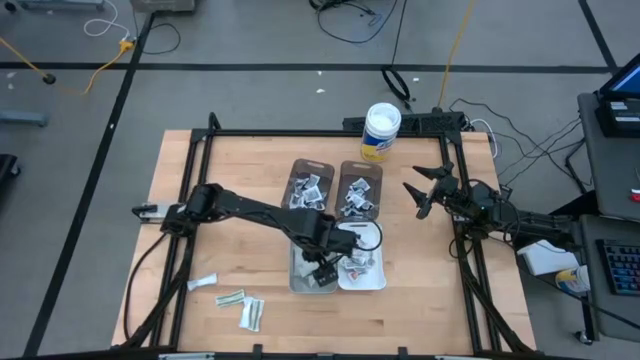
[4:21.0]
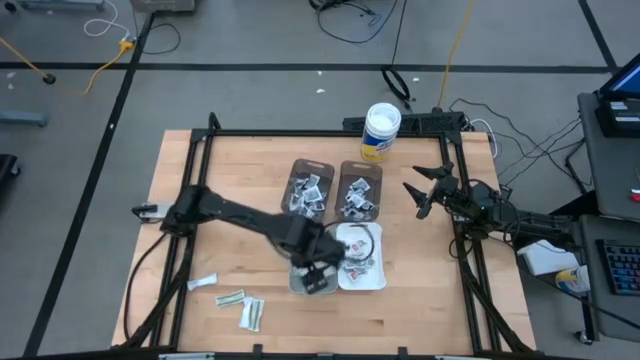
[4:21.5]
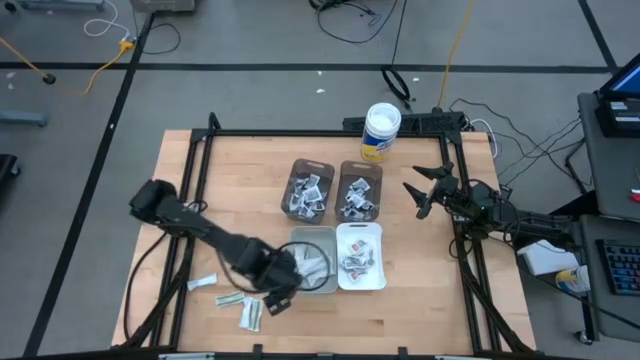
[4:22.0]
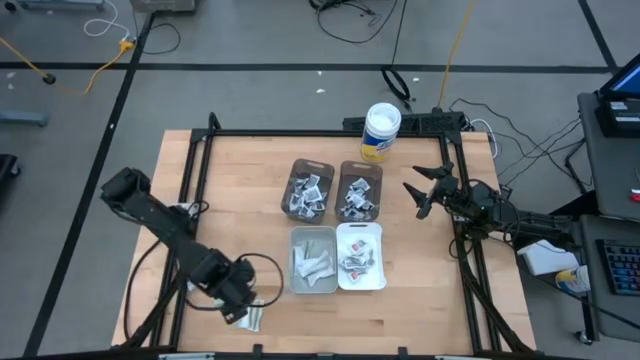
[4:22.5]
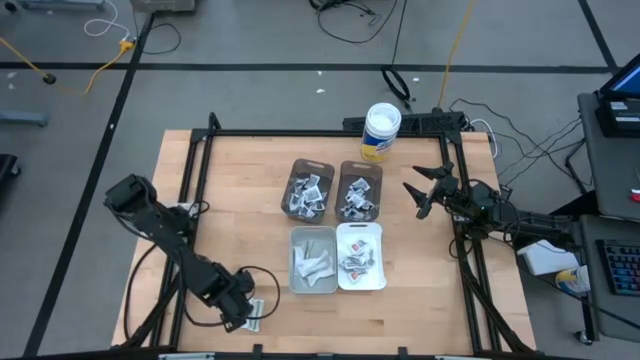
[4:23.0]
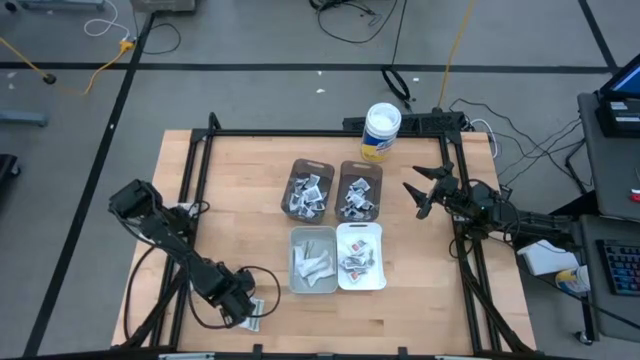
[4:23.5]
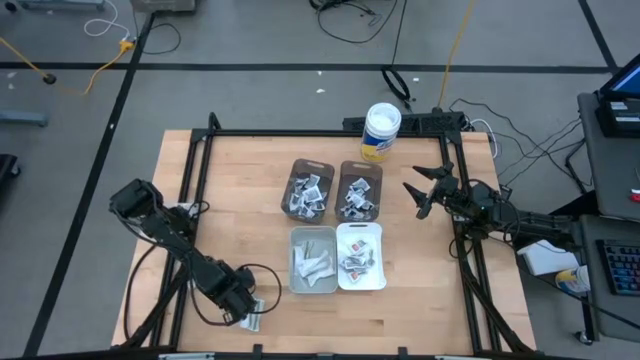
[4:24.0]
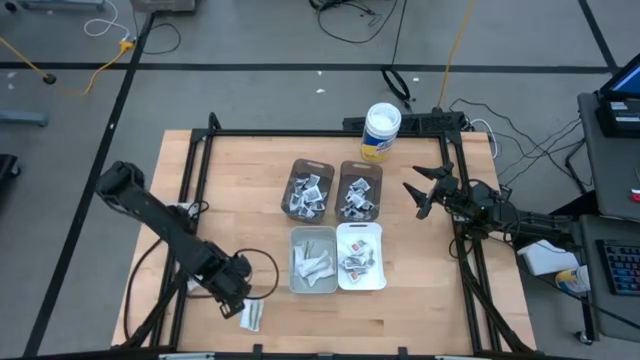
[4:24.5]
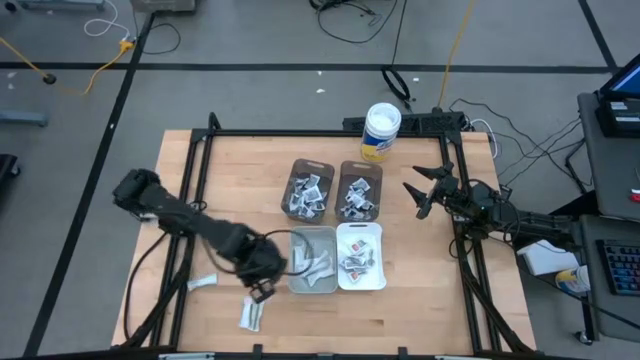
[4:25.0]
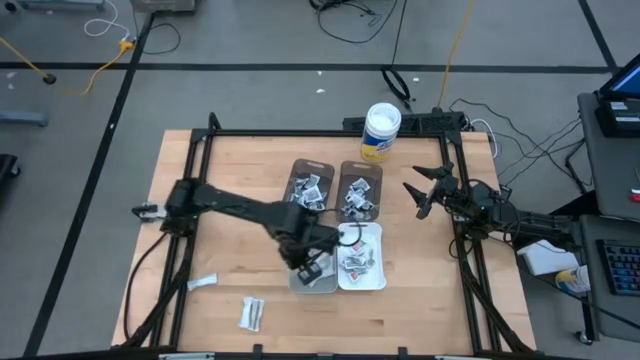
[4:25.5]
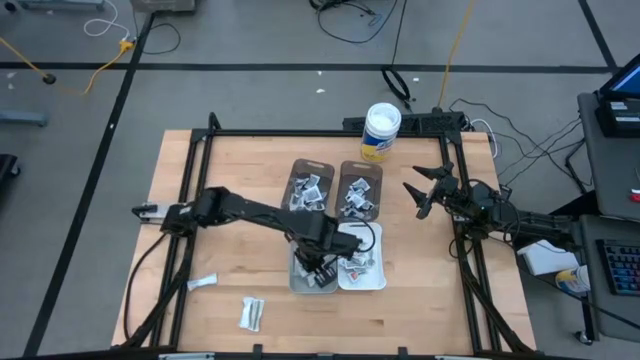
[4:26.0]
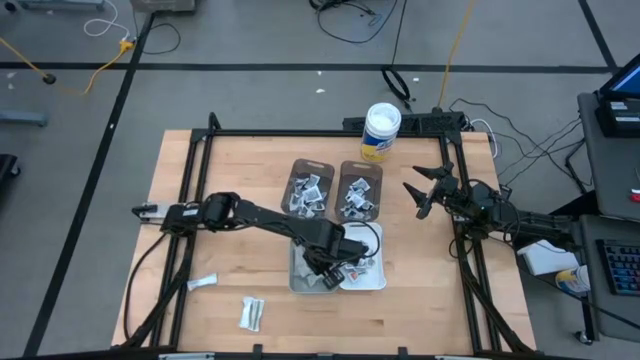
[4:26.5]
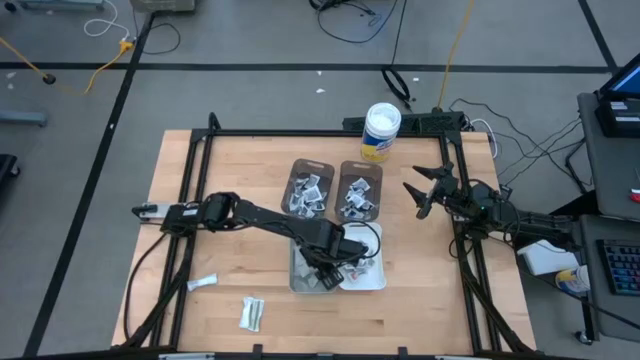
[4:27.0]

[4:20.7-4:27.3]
Task: Pick & Place First Aid Supplies
Put the green pad into the gray bin

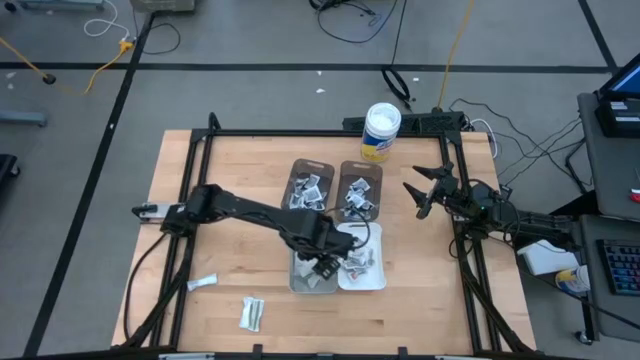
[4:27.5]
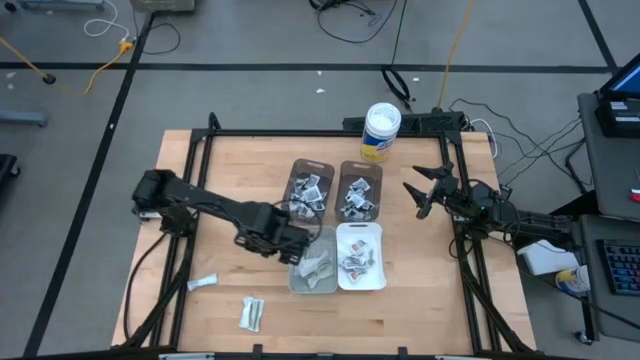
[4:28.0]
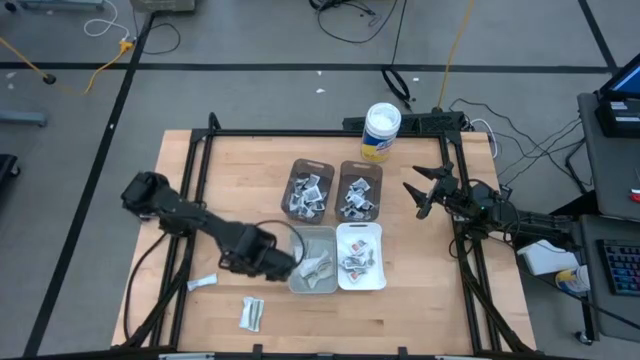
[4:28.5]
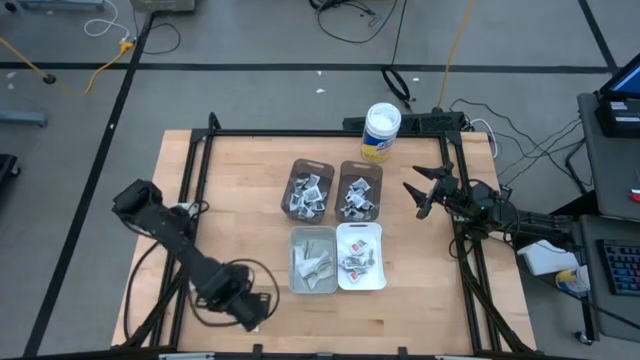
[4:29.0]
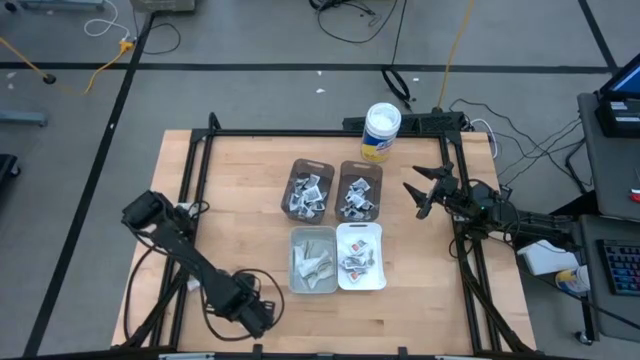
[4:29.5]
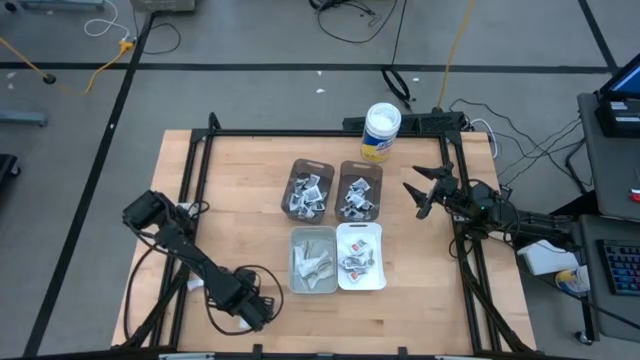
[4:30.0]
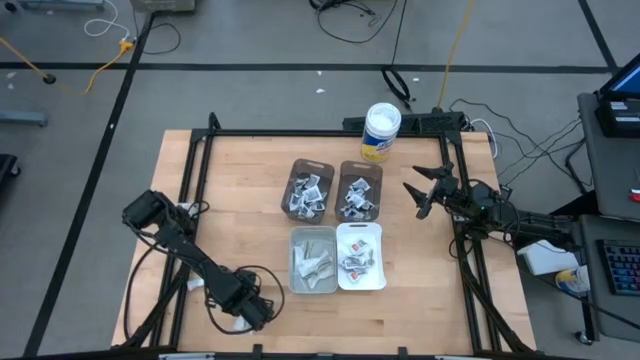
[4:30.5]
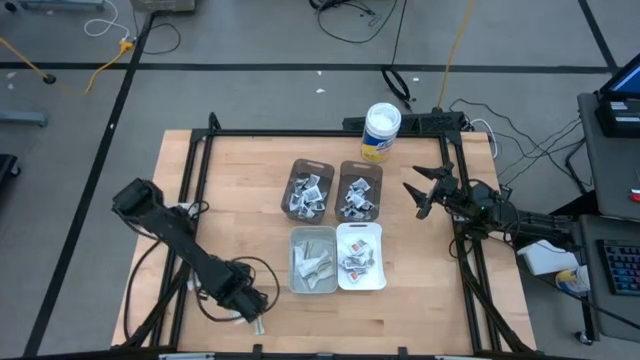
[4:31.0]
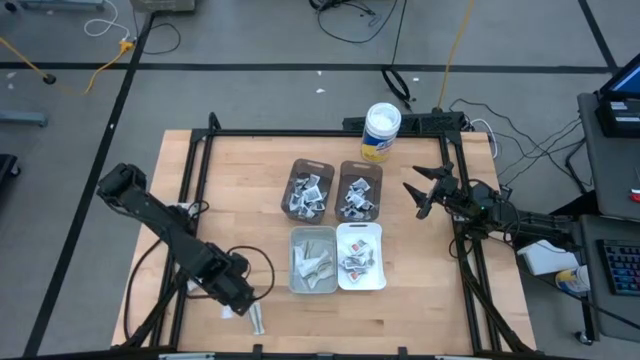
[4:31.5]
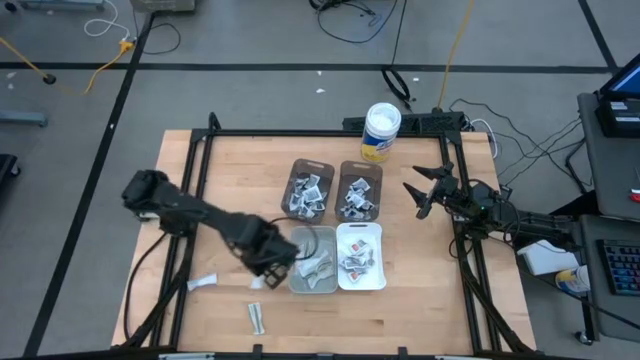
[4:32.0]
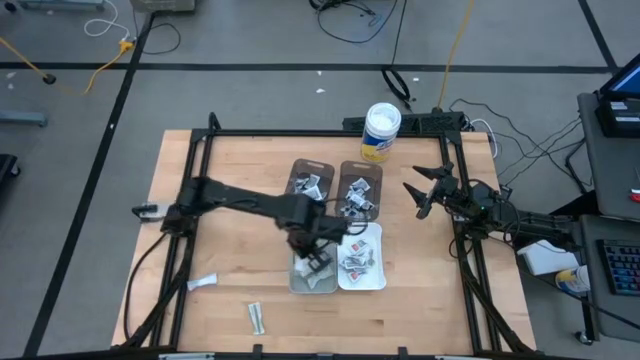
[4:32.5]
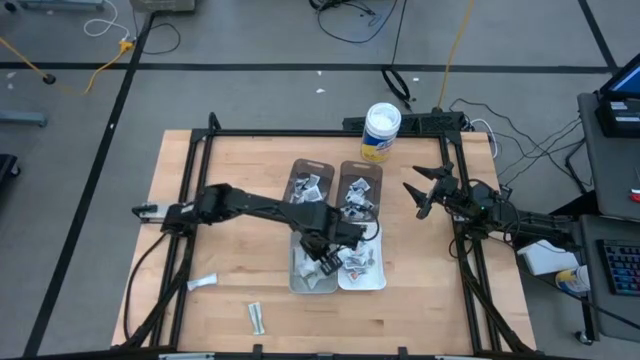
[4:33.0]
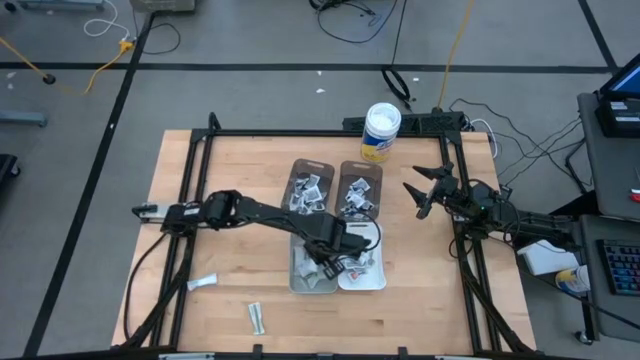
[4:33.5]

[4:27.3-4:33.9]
Put the green pad into the gray bin

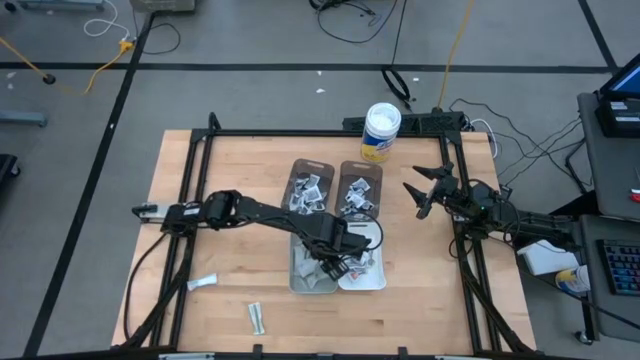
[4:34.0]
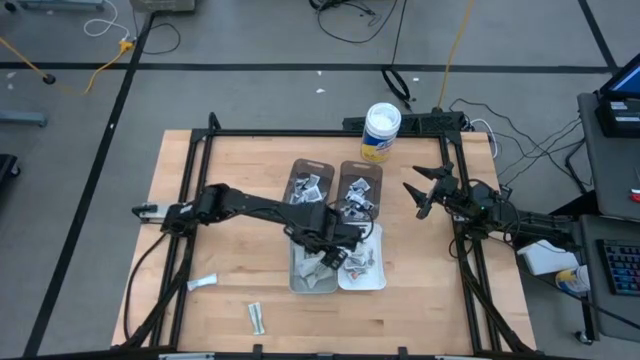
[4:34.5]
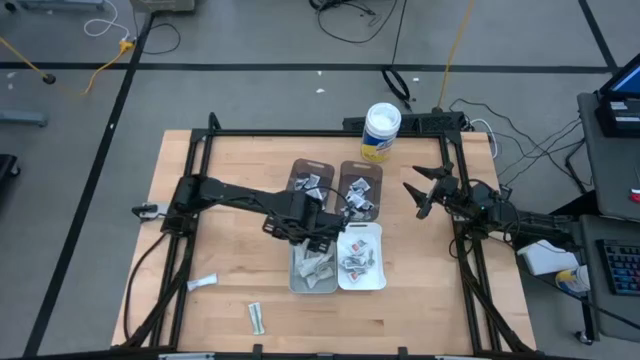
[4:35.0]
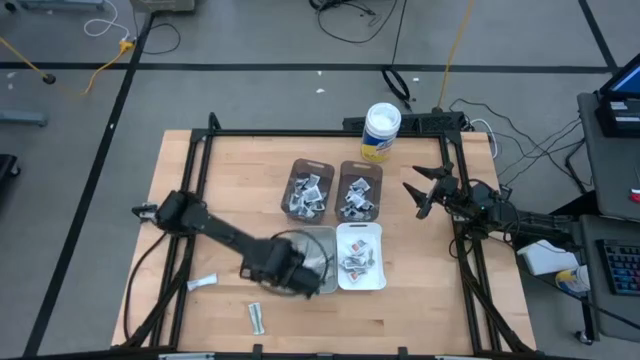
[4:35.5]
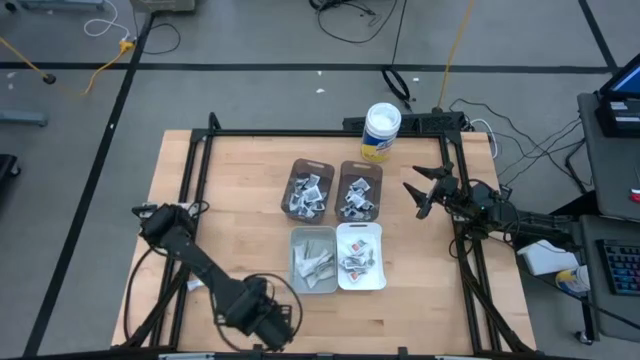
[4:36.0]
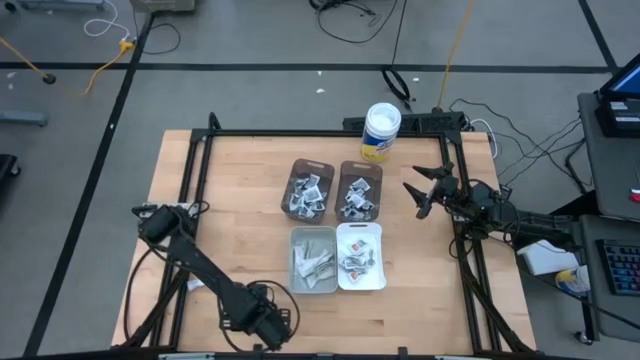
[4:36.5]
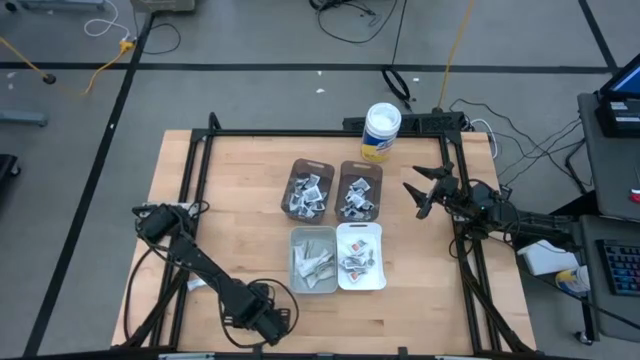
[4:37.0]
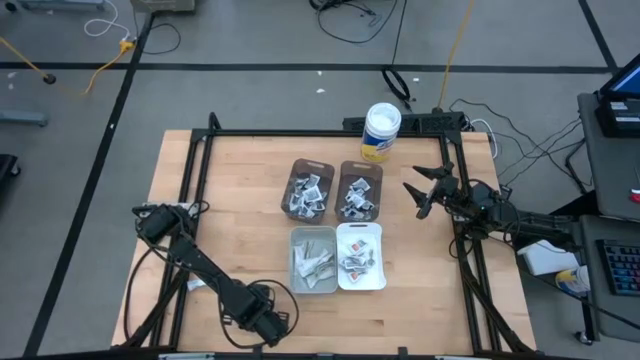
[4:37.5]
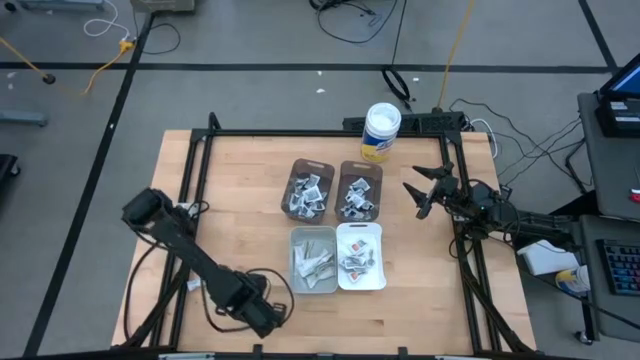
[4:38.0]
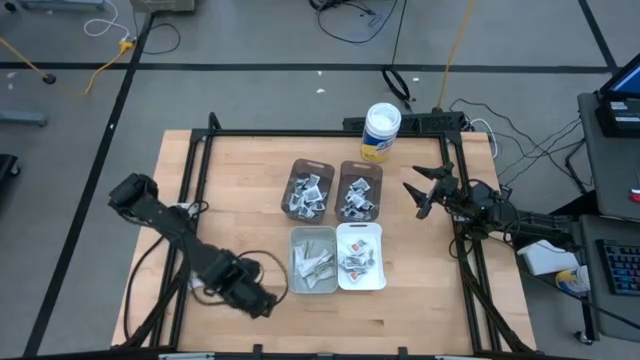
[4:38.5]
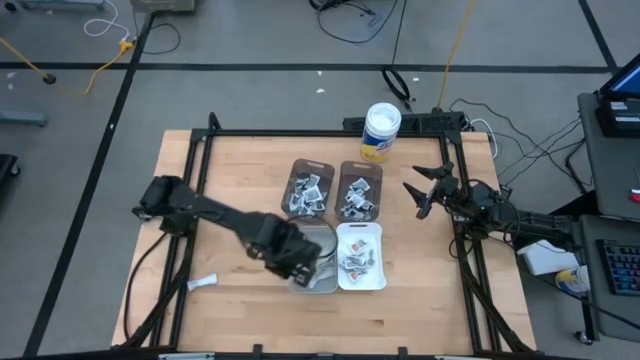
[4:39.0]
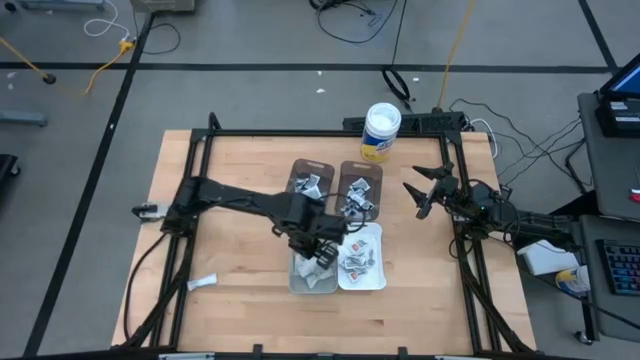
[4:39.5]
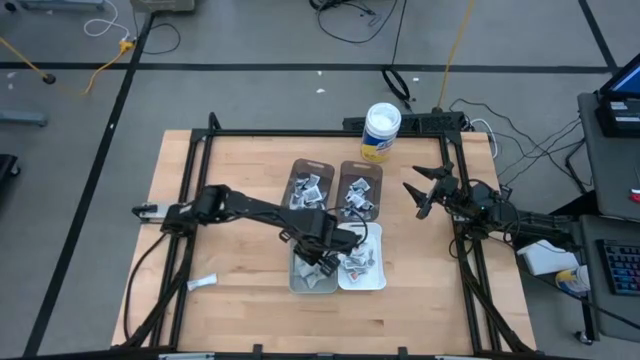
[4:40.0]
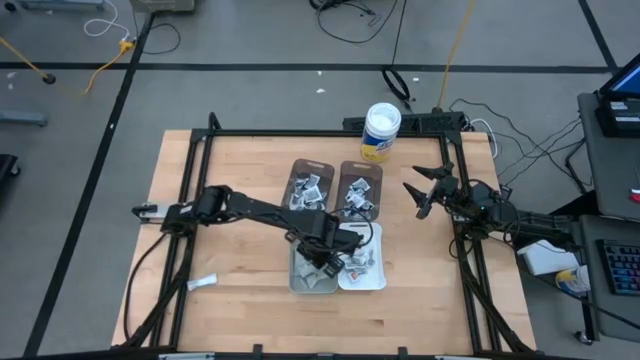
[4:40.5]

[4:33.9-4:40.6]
Put the green pad into the gray bin

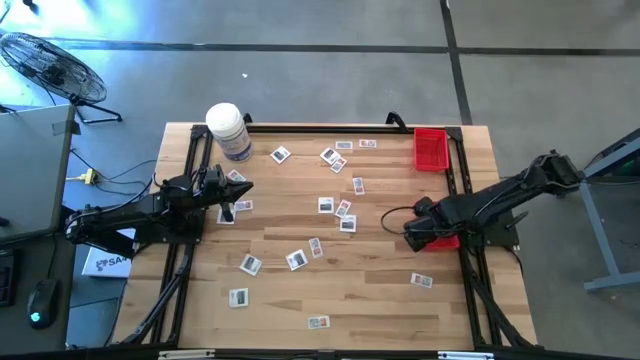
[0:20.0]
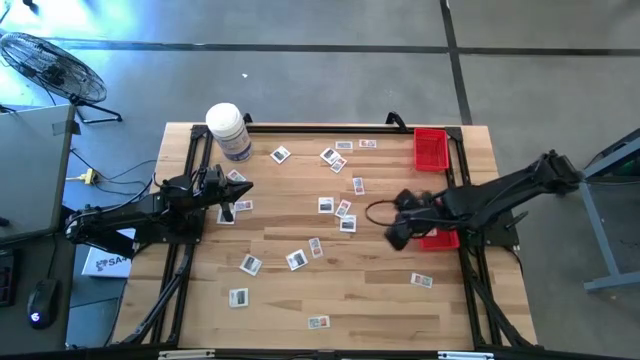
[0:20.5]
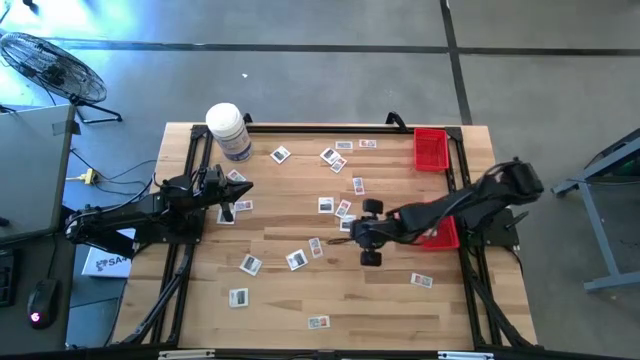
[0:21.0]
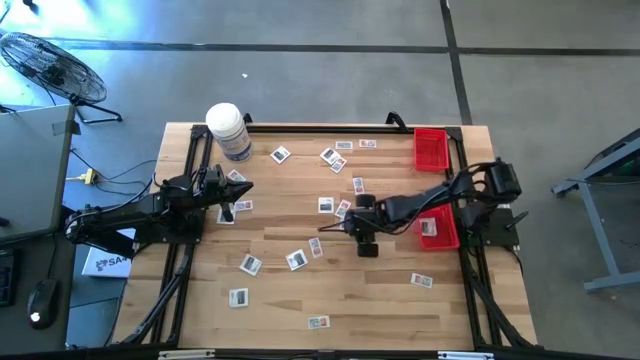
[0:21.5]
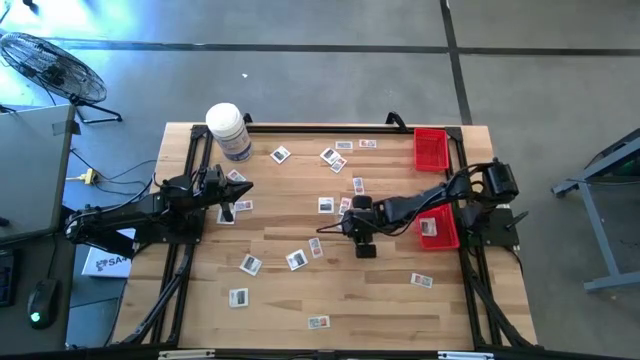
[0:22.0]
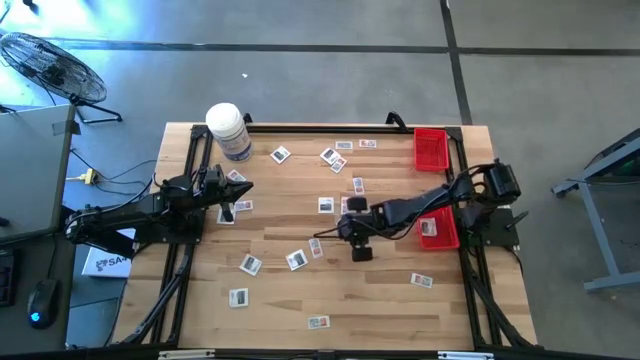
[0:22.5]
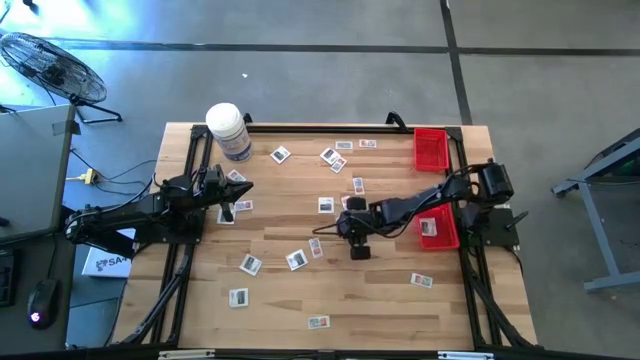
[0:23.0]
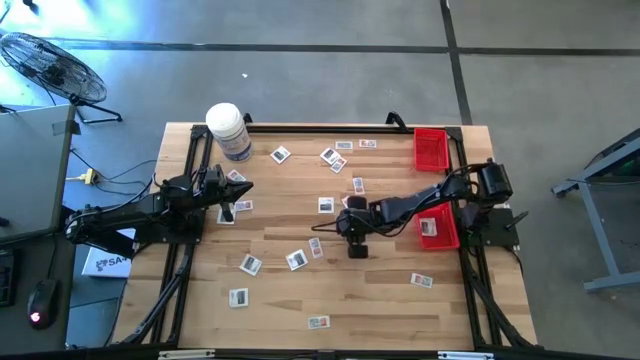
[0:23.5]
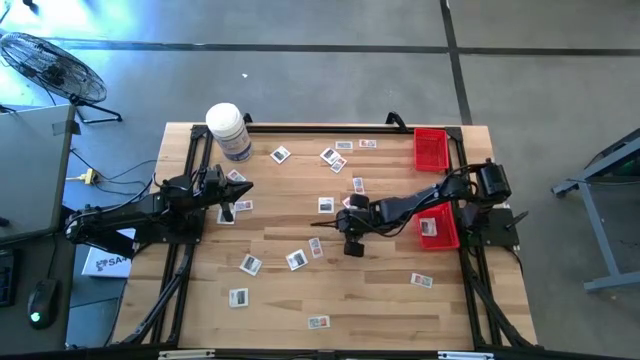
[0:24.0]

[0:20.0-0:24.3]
Task: Pick & Place First Aid Supplies
Put the towelette pack into the bottom basket
